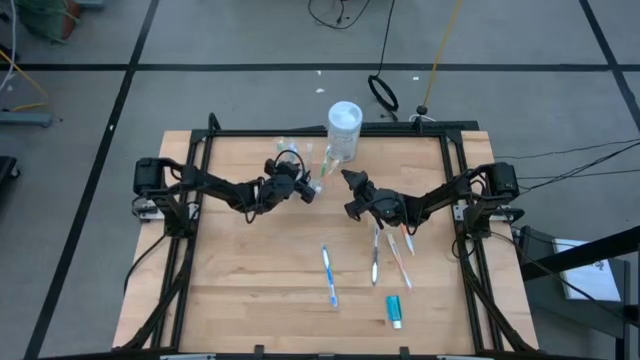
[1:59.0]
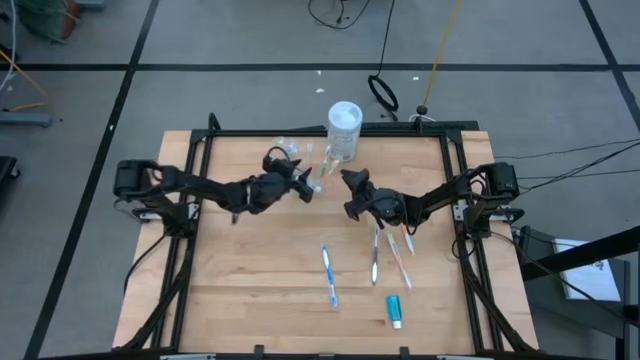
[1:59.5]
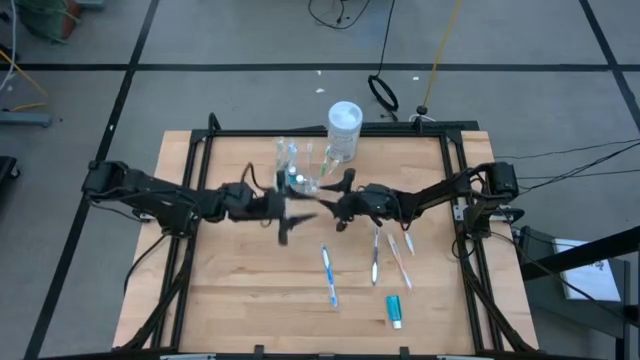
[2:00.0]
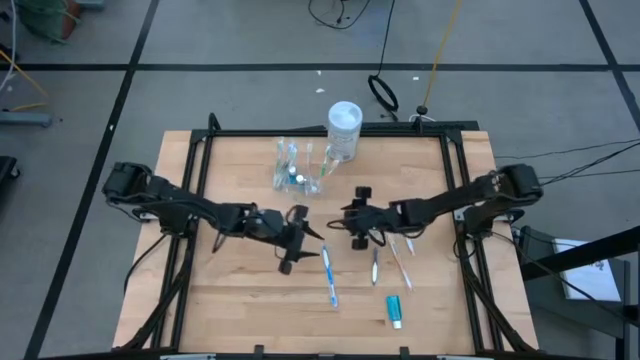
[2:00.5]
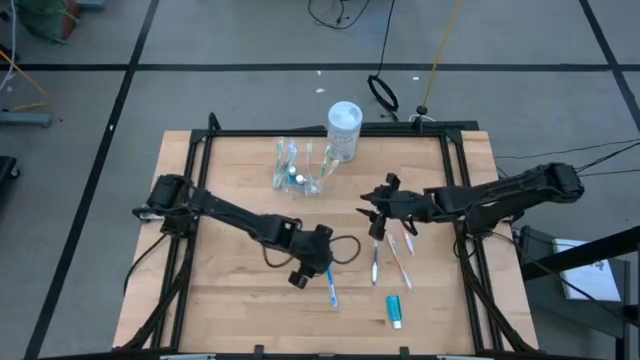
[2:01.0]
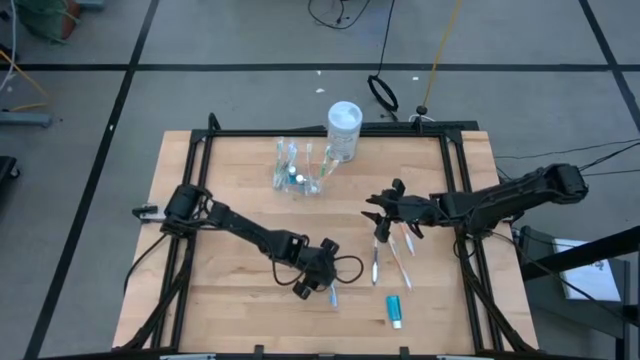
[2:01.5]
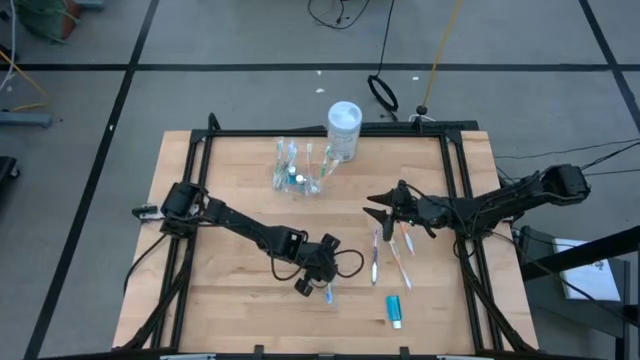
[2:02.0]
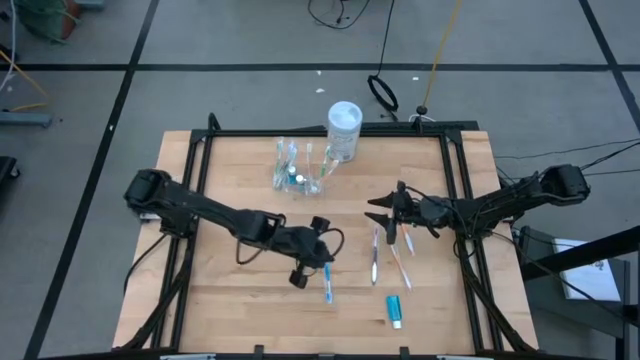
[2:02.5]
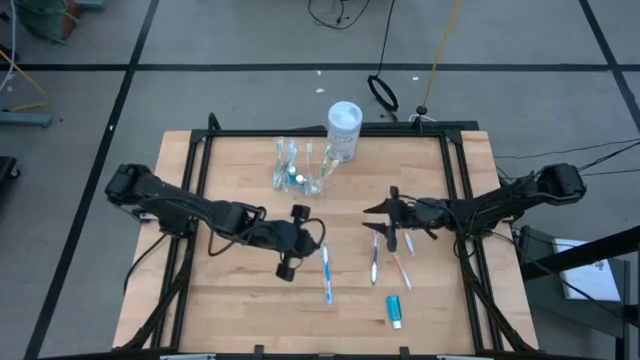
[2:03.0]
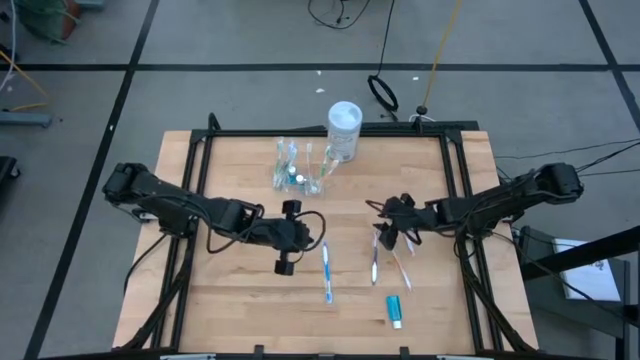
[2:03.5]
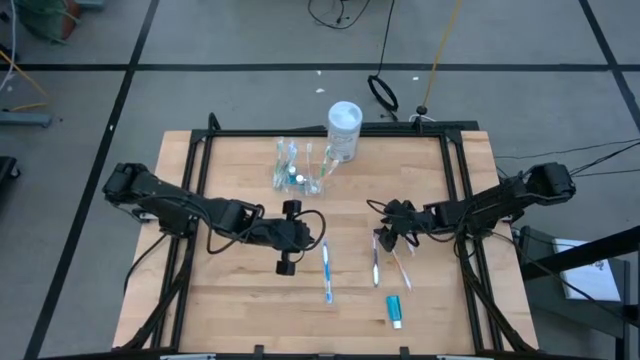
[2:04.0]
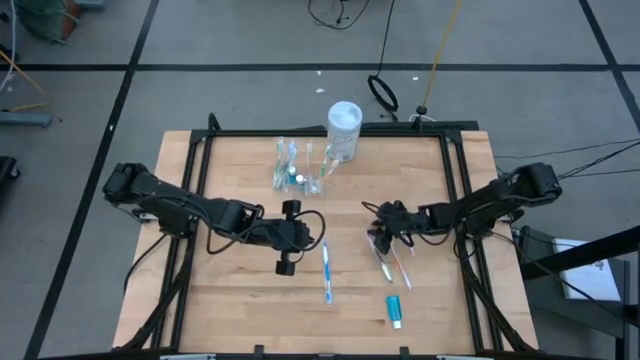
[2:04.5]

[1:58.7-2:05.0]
Task: Pick & Place toothbrushing station
Put the violet toothbrush into the transparent organizer

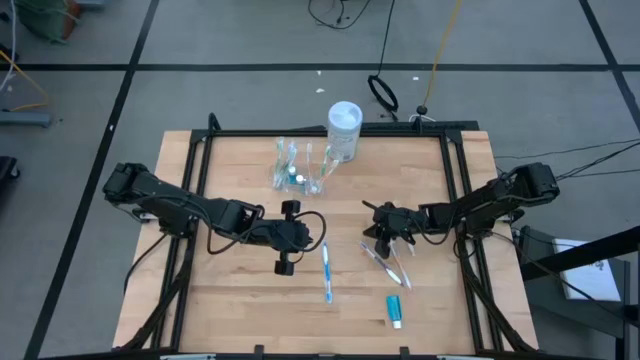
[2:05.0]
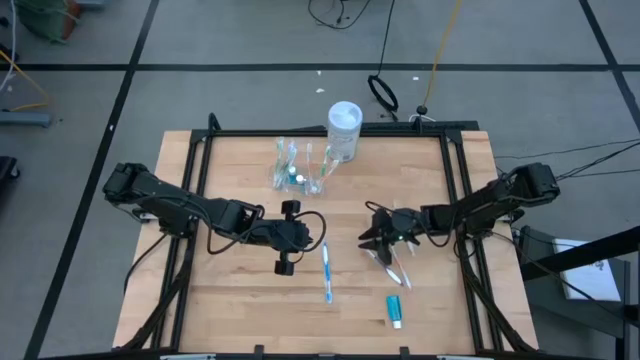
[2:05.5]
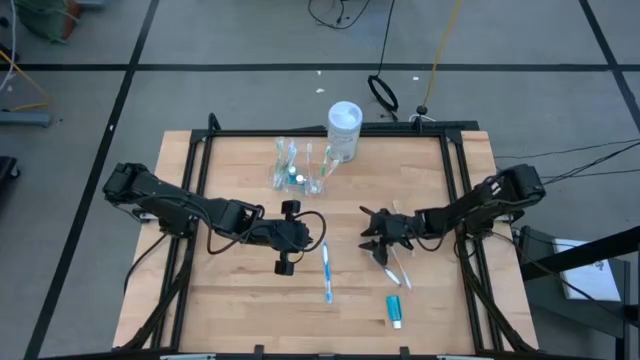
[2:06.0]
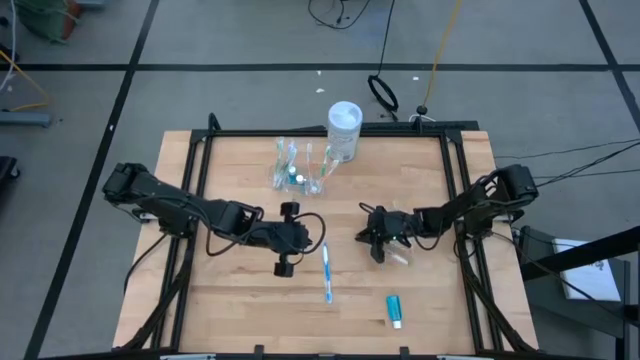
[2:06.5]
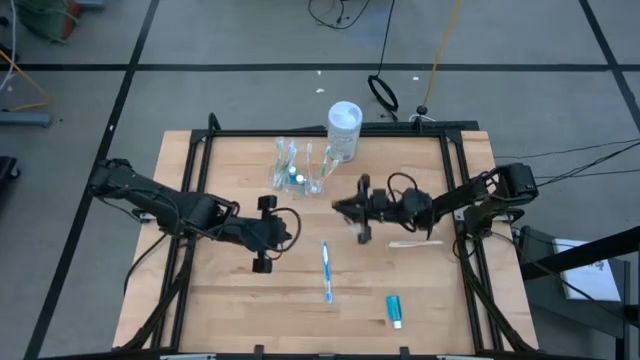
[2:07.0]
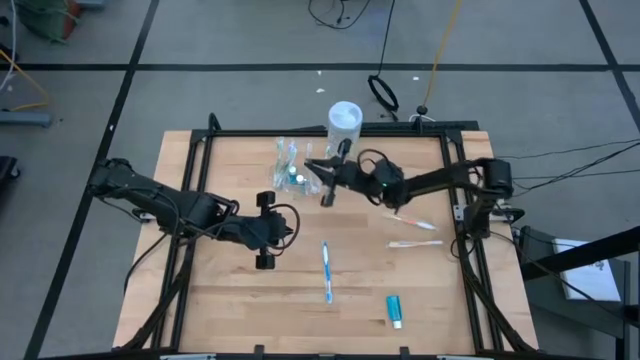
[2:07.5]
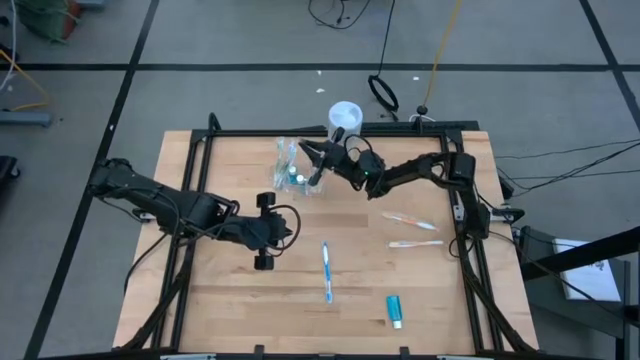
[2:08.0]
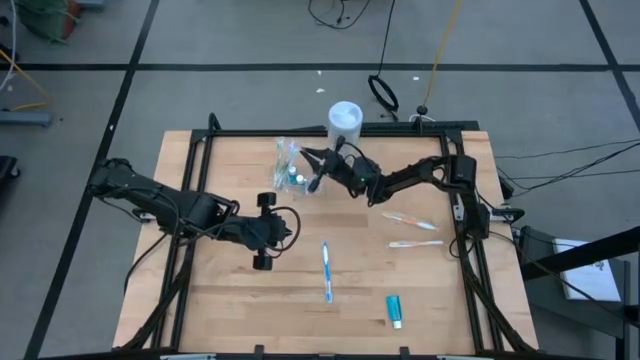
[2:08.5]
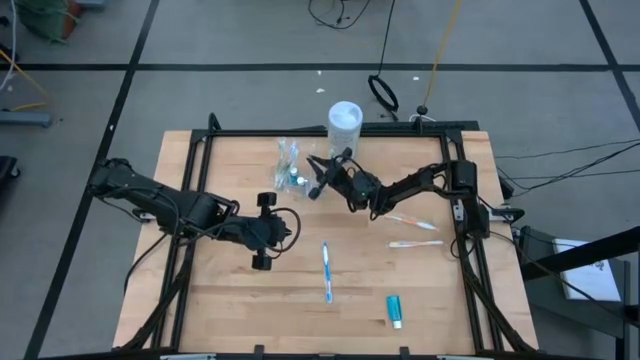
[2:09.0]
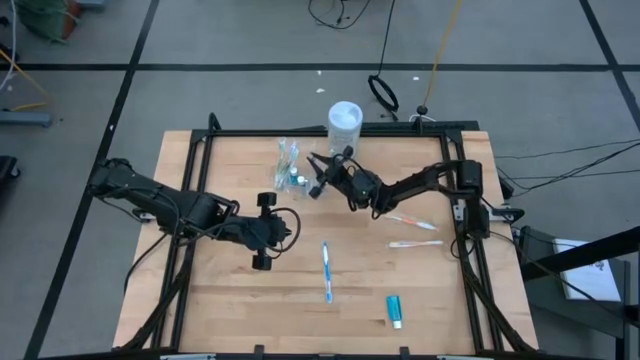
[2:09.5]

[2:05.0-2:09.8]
Put the violet toothbrush into the transparent organizer

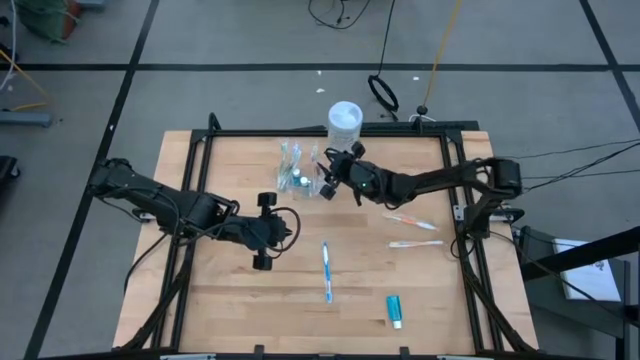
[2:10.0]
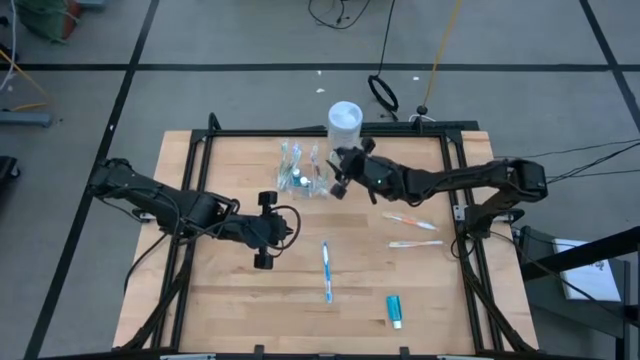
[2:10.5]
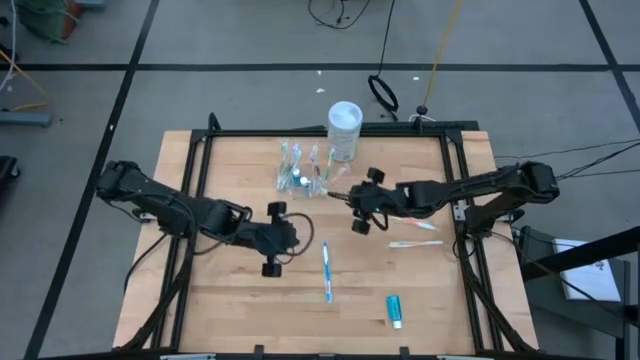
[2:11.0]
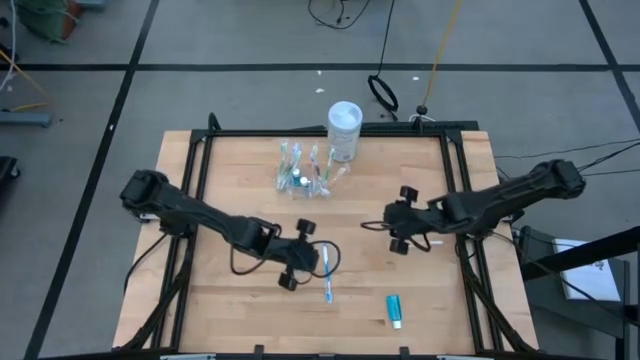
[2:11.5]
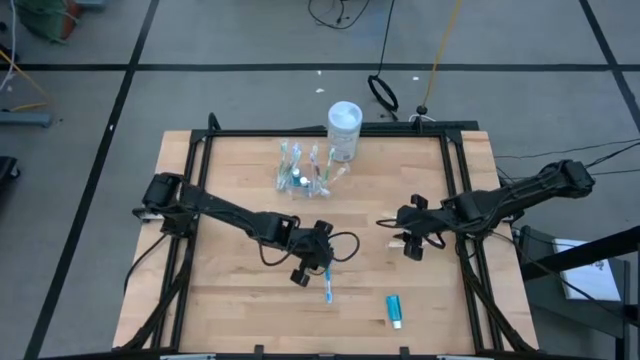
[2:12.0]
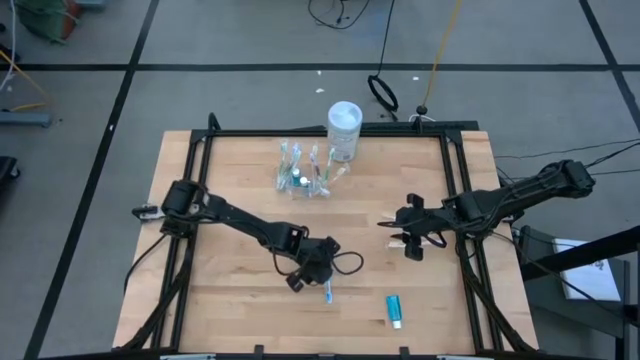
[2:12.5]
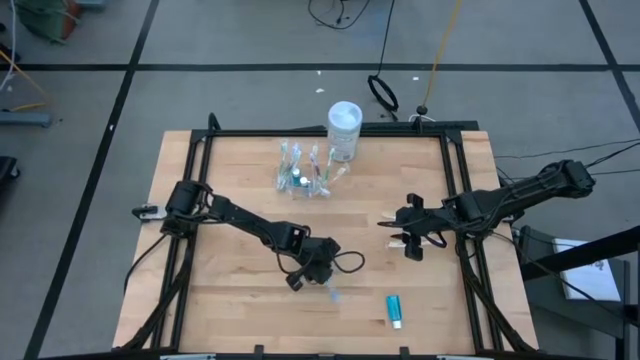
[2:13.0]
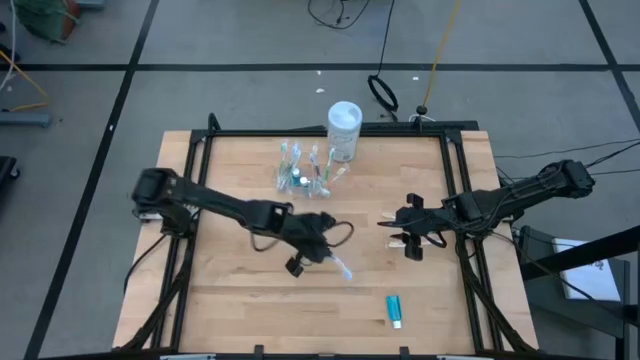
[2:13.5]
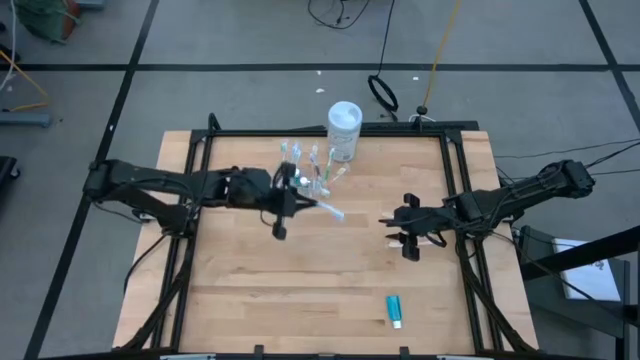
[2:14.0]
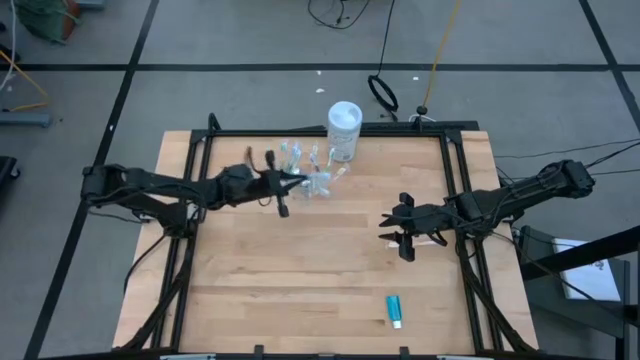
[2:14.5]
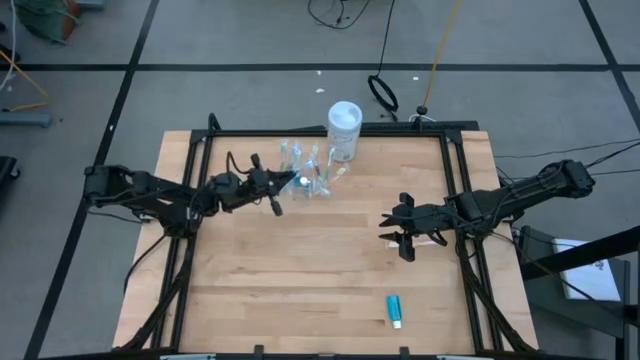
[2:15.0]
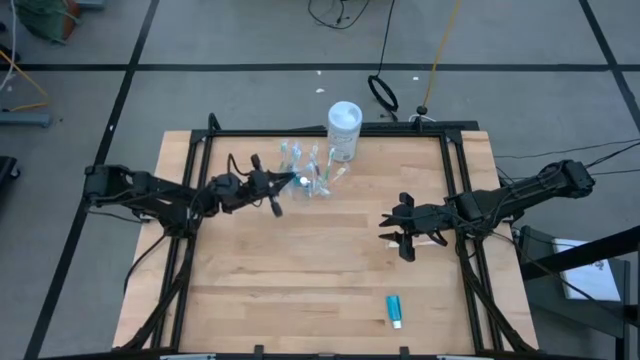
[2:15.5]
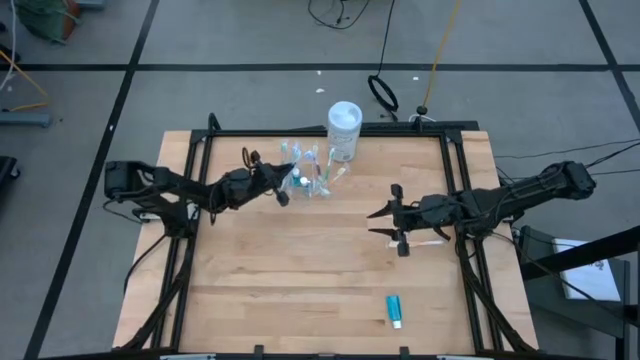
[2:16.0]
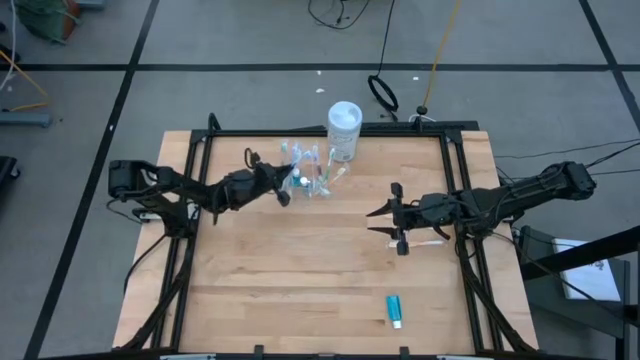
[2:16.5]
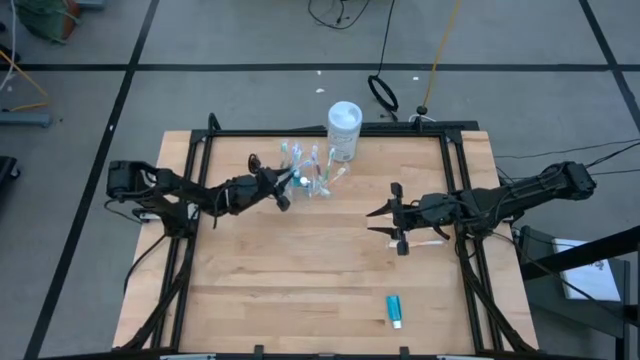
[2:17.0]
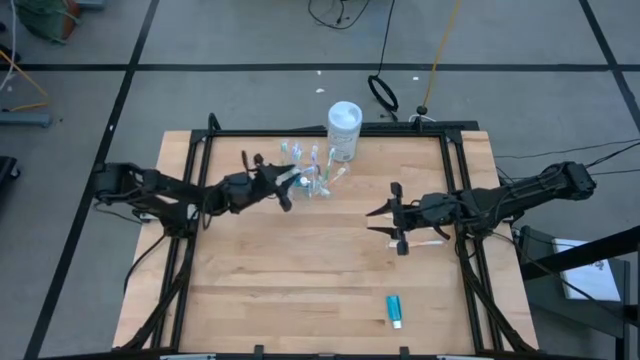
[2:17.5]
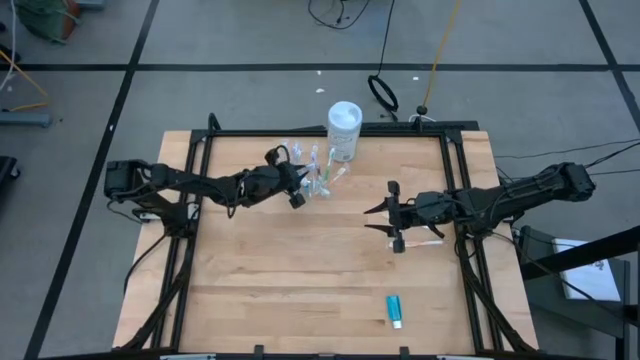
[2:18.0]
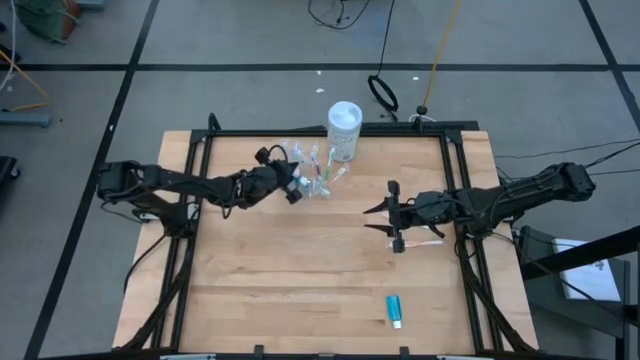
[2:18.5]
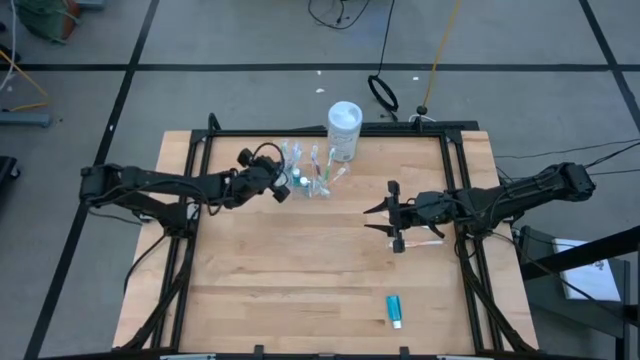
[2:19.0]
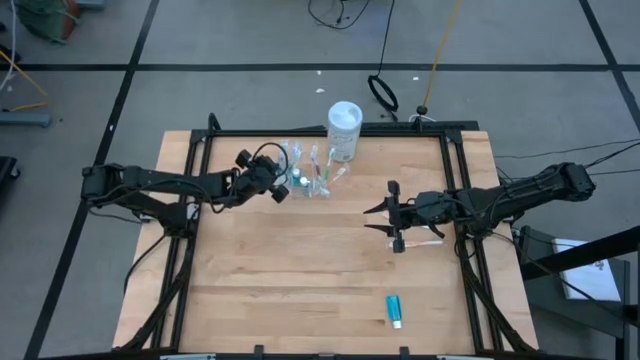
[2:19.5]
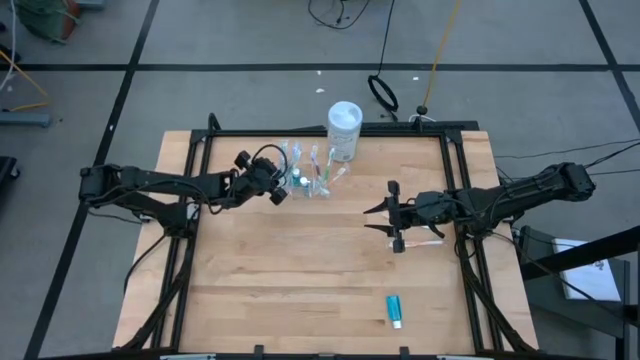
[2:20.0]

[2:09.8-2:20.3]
Put the blue toothbrush into the transparent organizer
